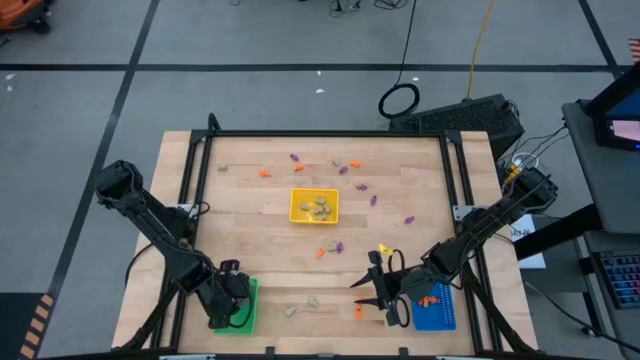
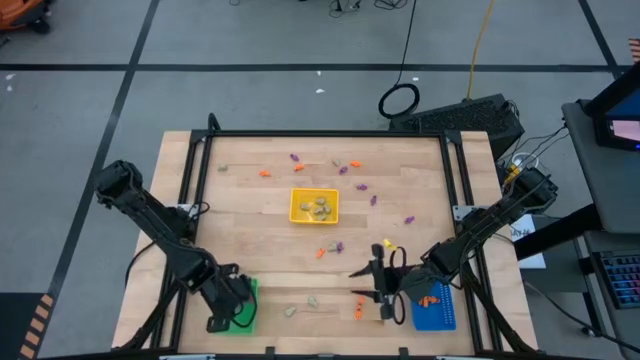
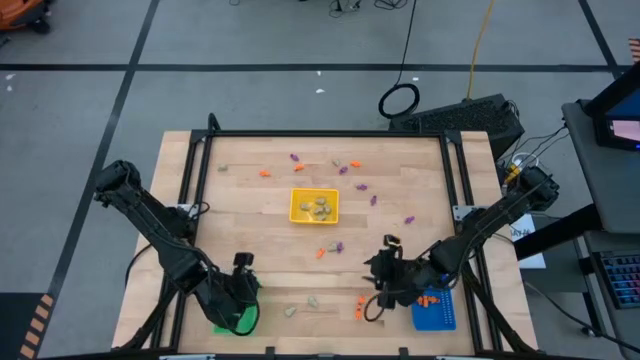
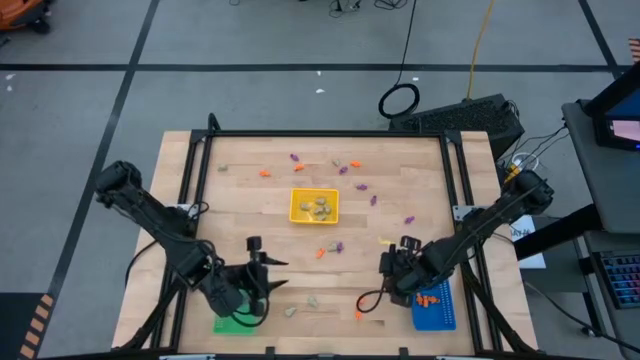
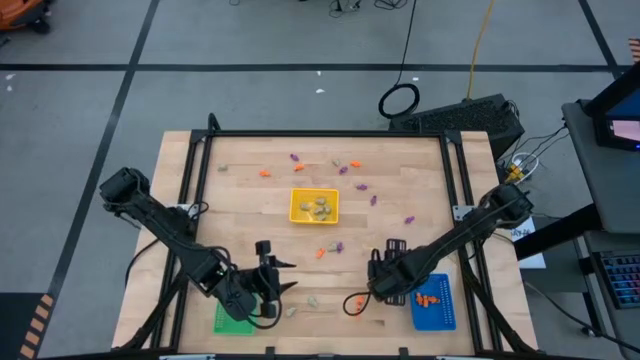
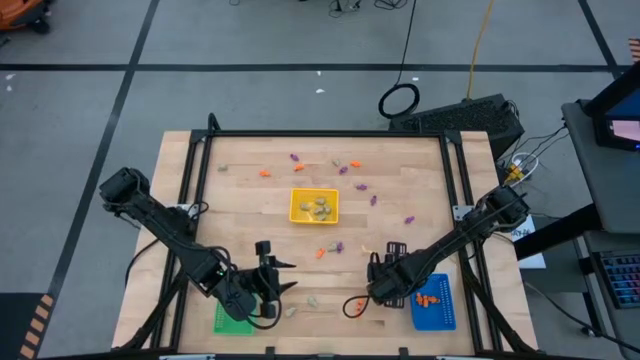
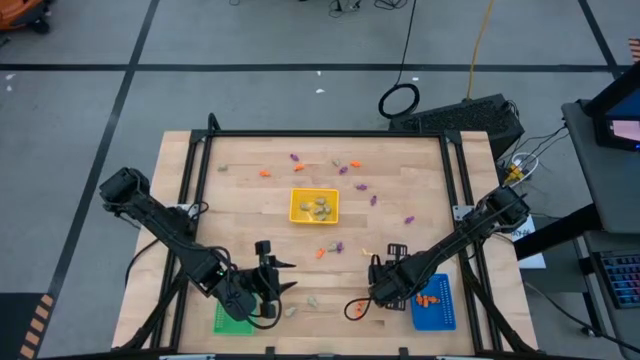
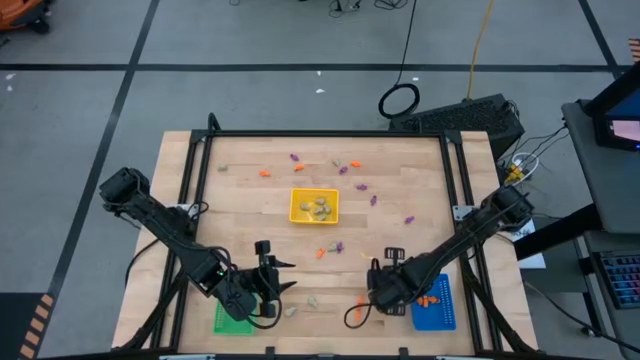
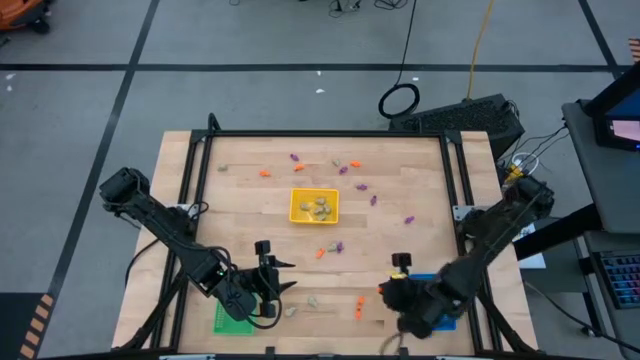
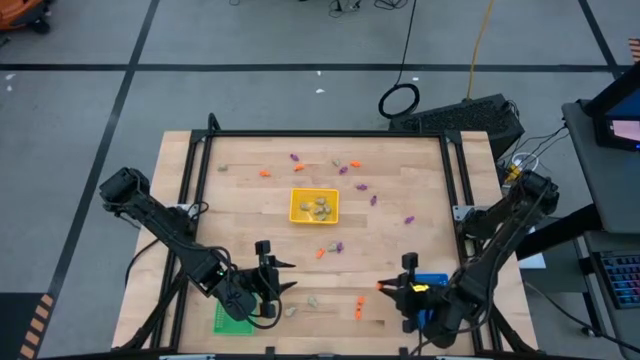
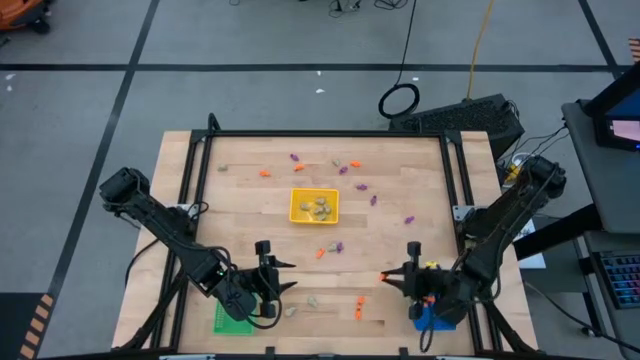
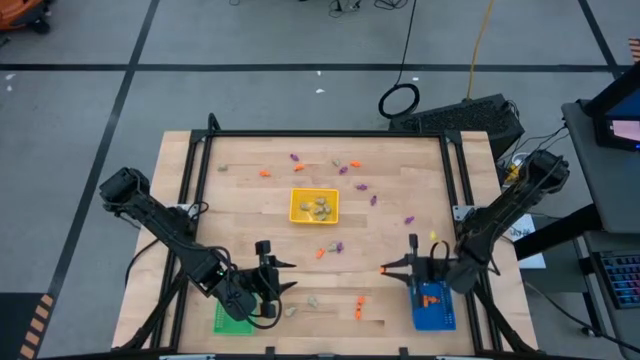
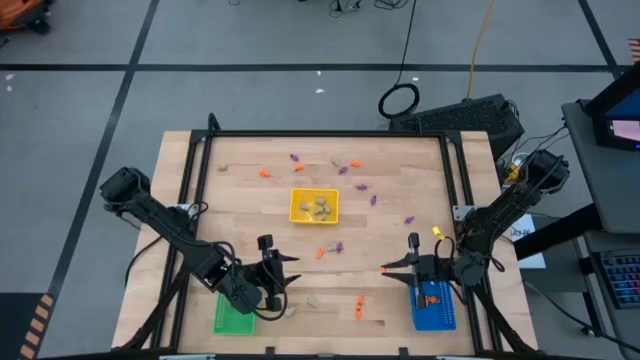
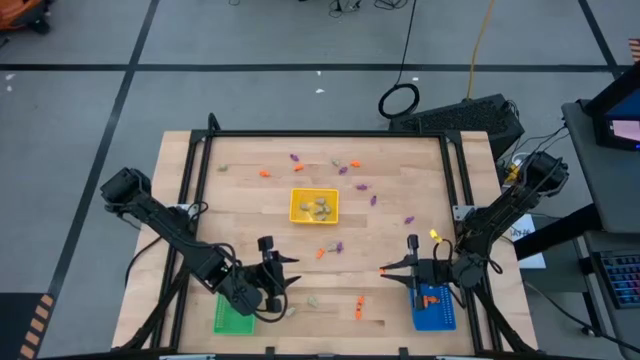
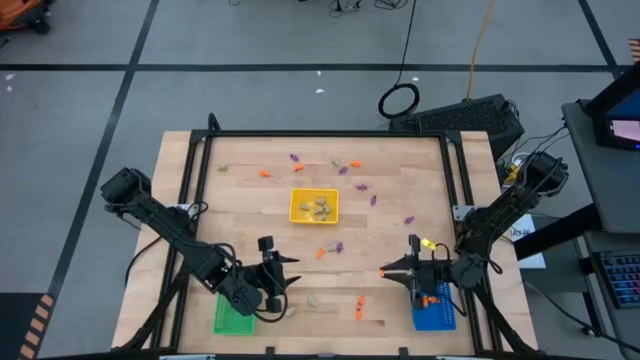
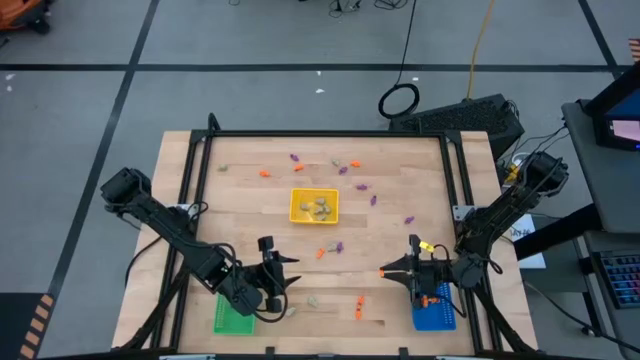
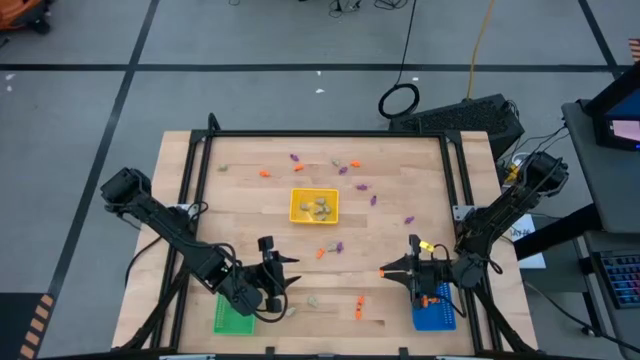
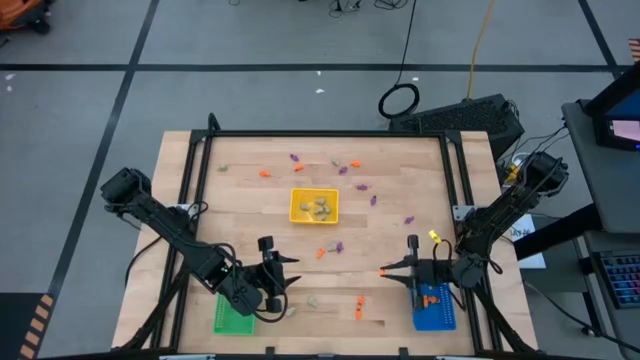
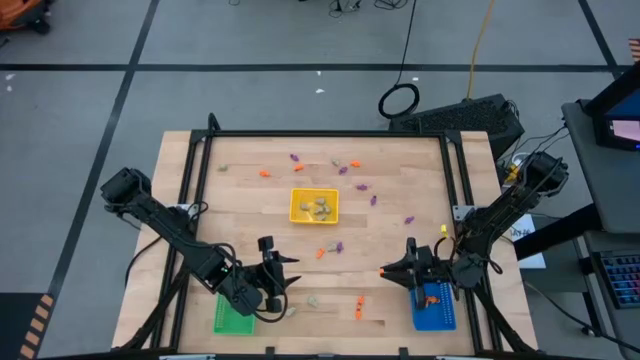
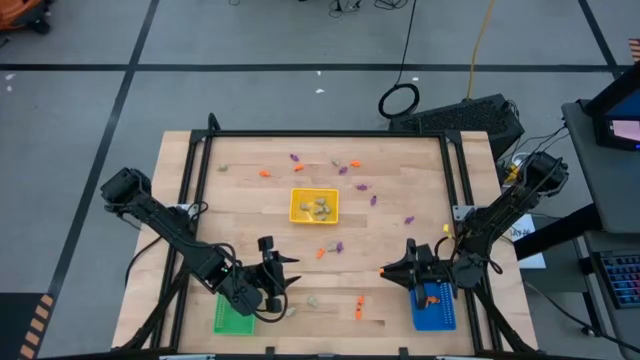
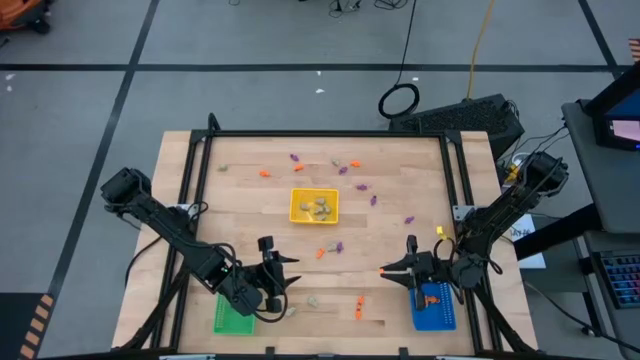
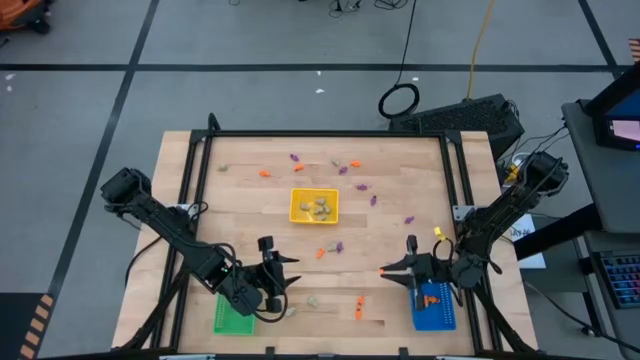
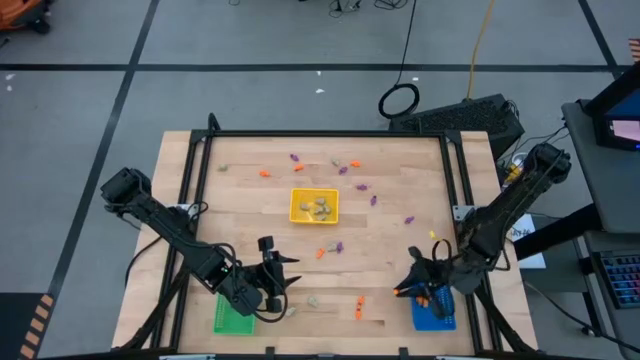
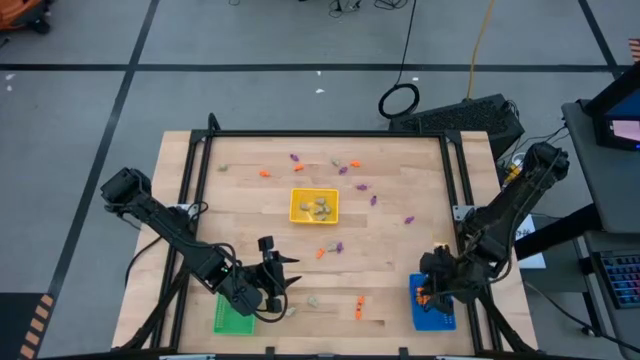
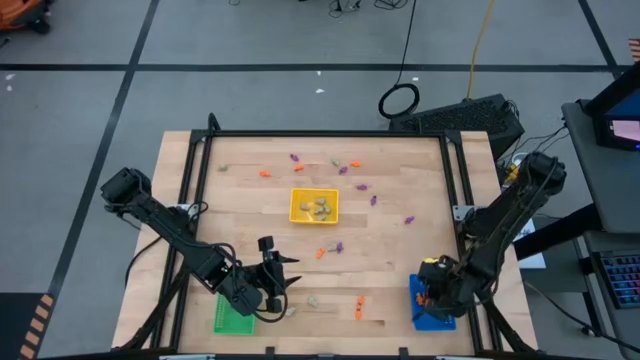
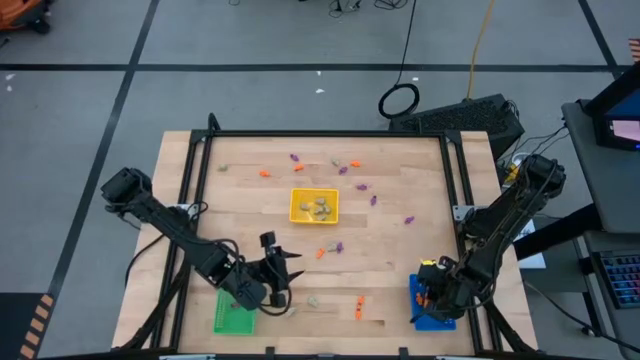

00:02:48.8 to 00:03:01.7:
Task: Sort Halloween decoration
Put the orange skeleton toy in the blue basket

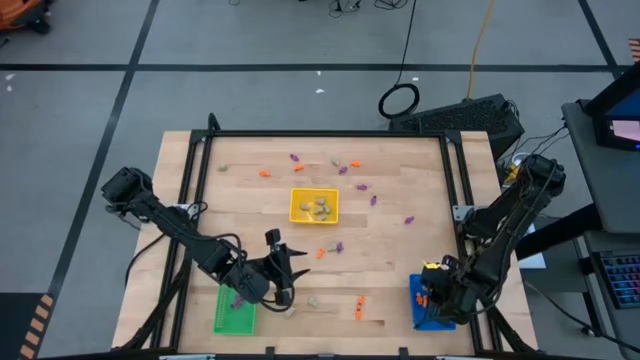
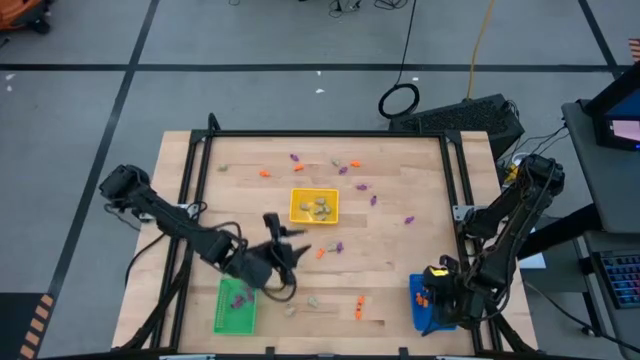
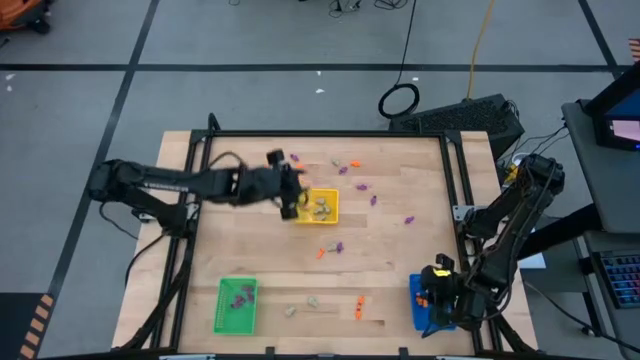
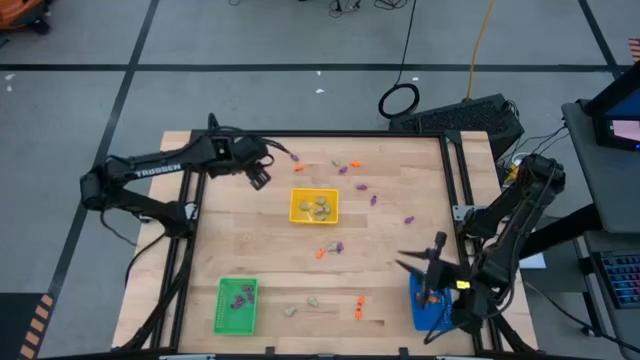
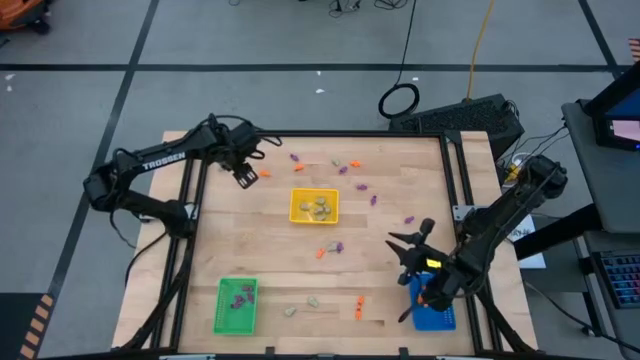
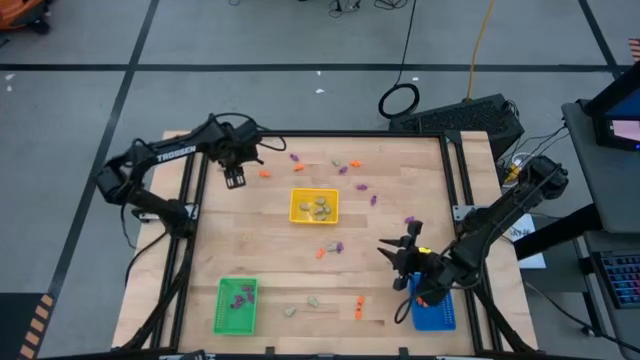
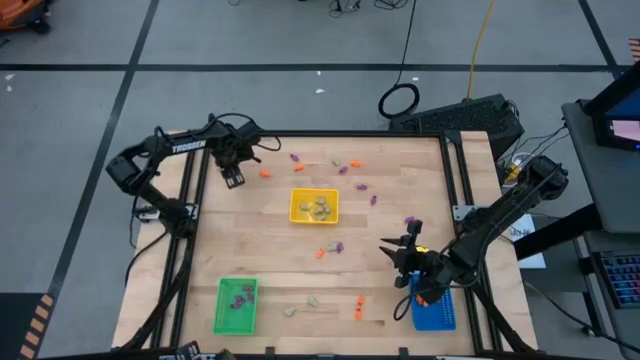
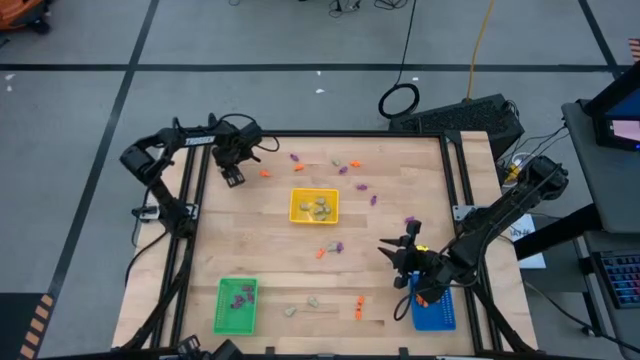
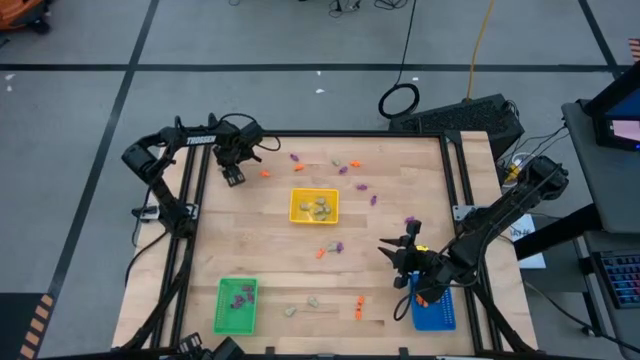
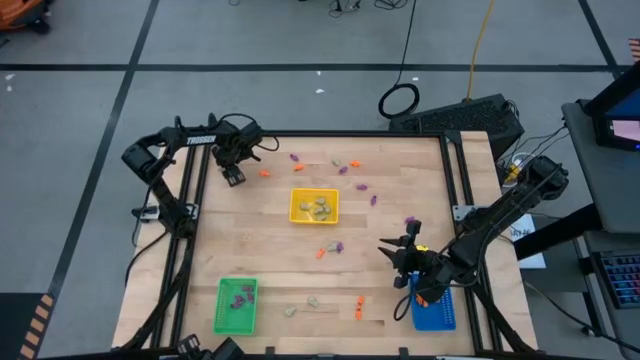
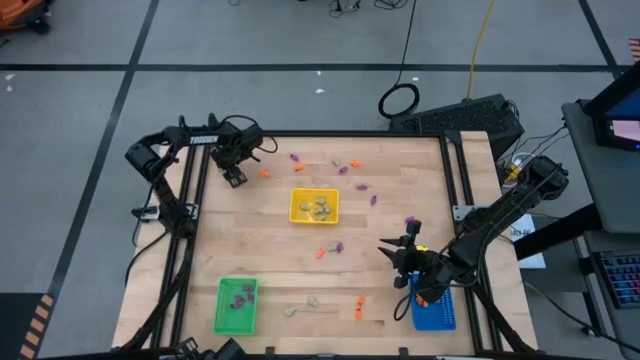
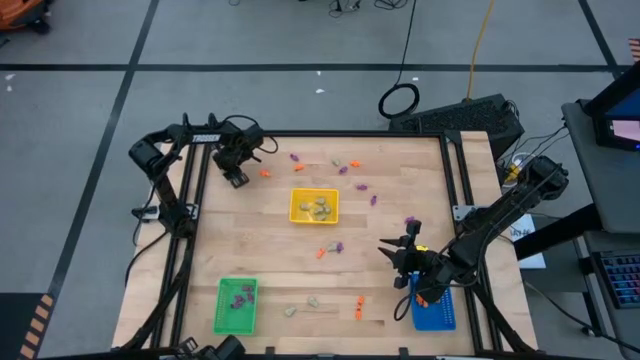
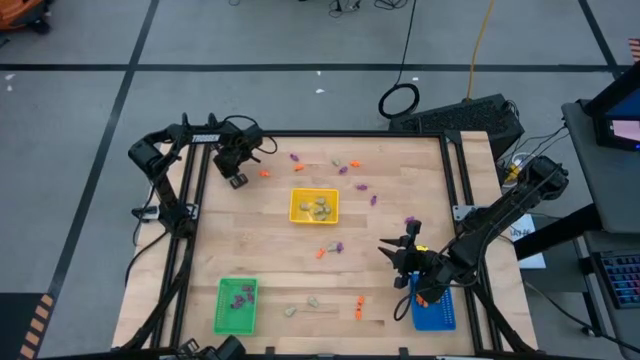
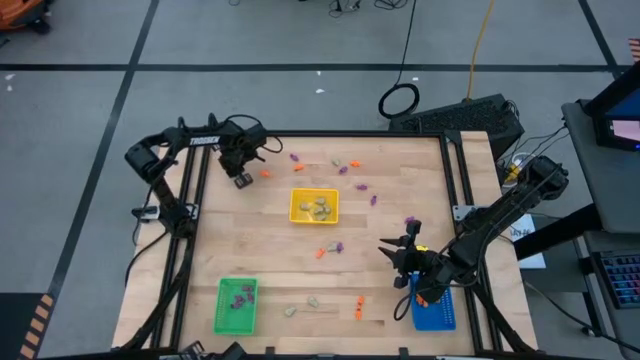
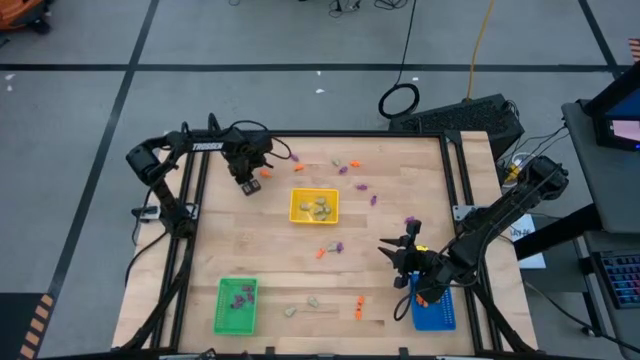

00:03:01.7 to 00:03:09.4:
Put the white skull toy in the yellow basket

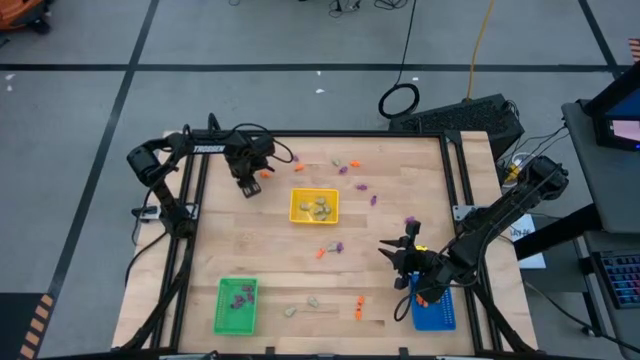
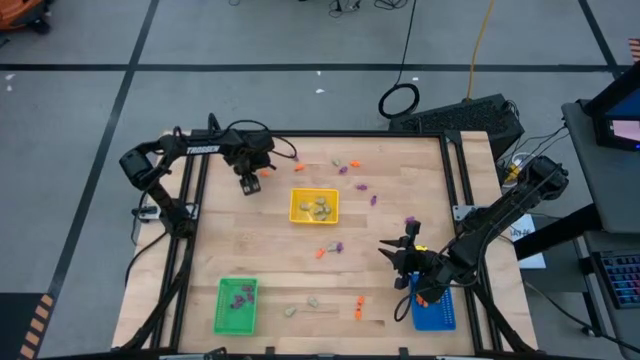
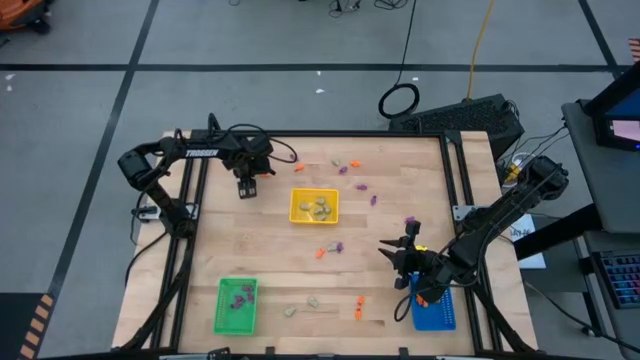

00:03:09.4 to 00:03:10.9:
Put the white skull toy in the yellow basket
